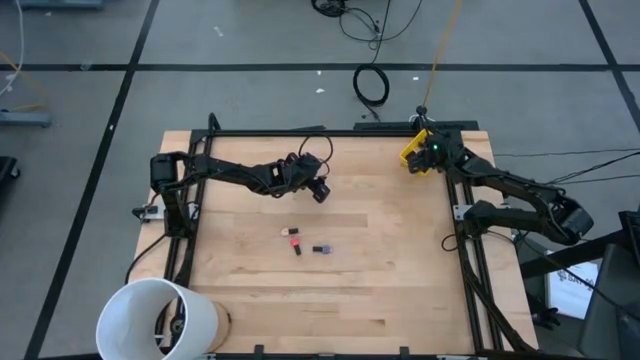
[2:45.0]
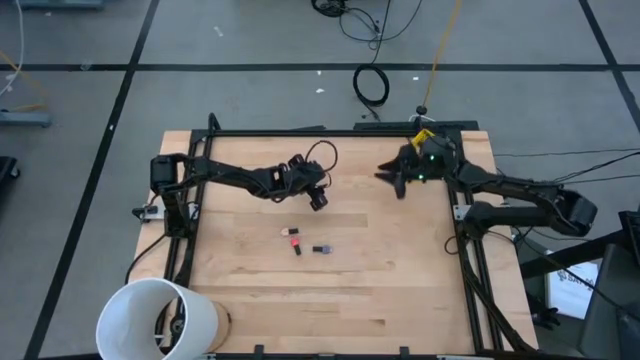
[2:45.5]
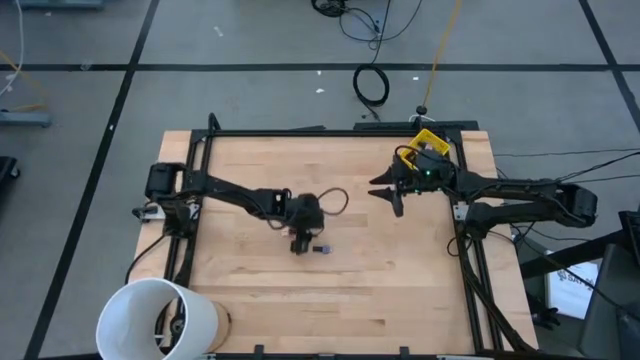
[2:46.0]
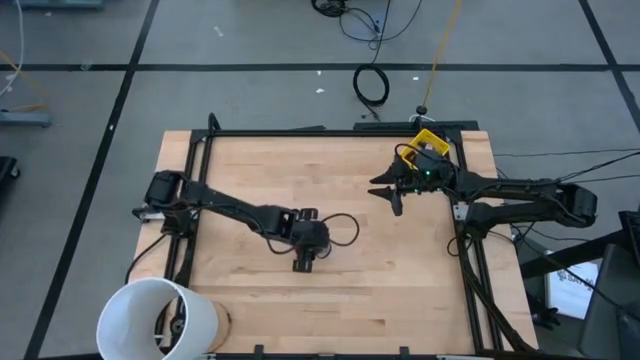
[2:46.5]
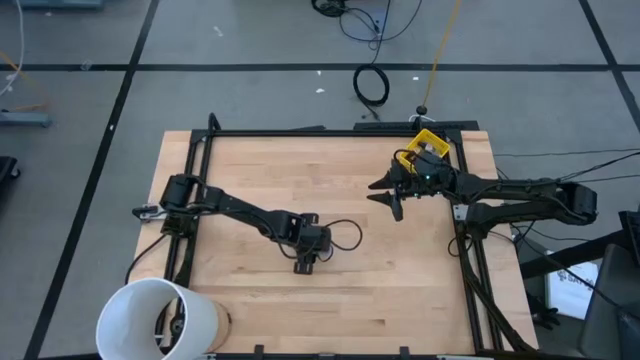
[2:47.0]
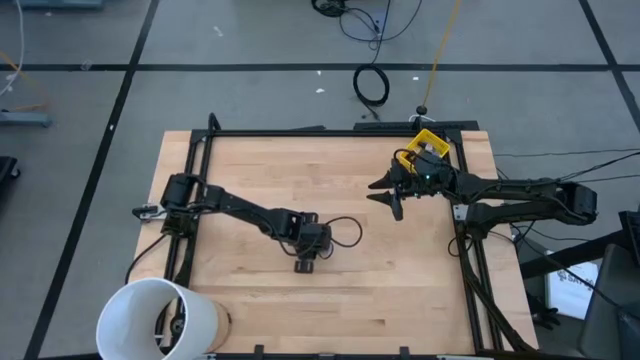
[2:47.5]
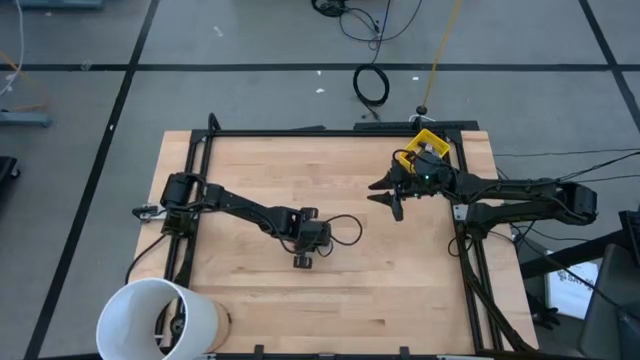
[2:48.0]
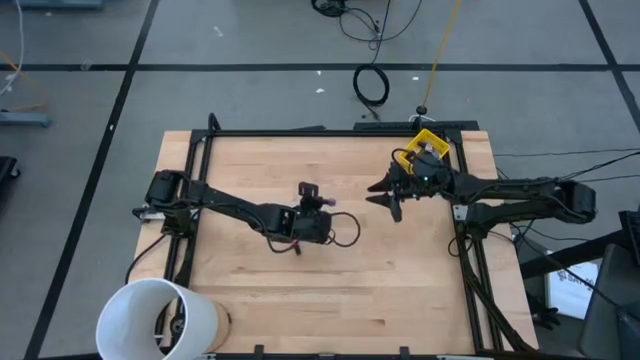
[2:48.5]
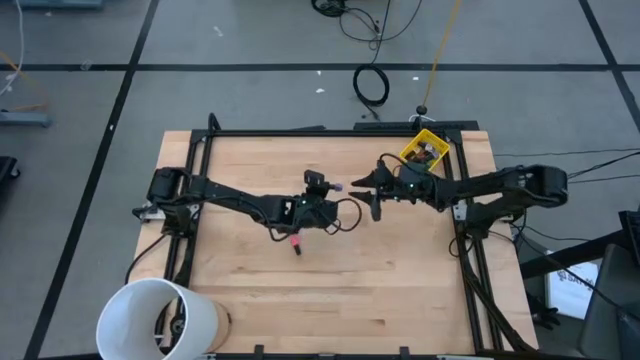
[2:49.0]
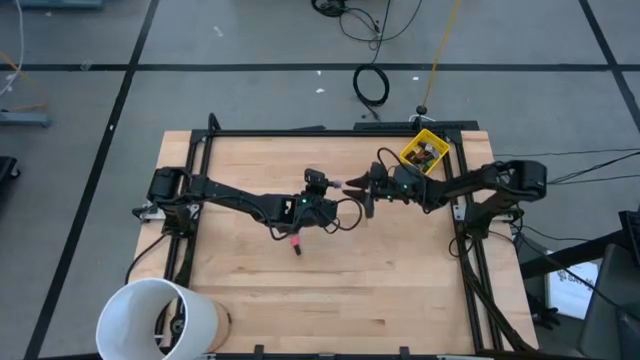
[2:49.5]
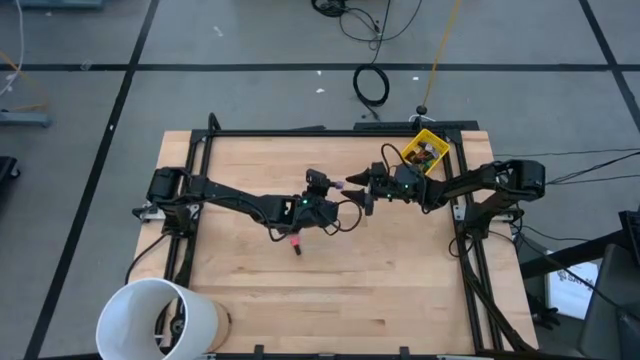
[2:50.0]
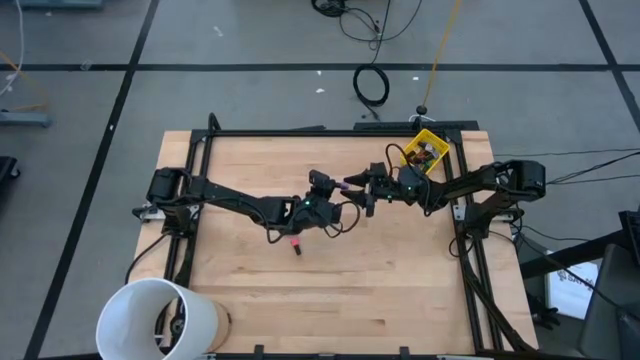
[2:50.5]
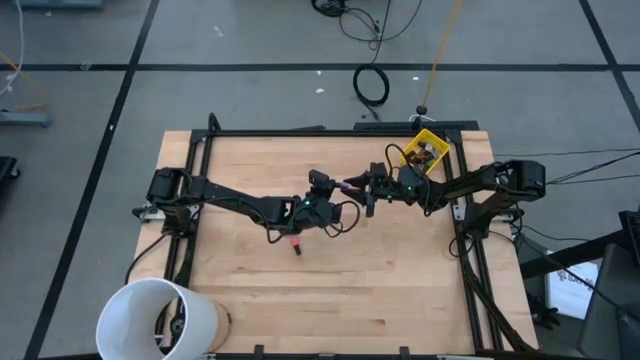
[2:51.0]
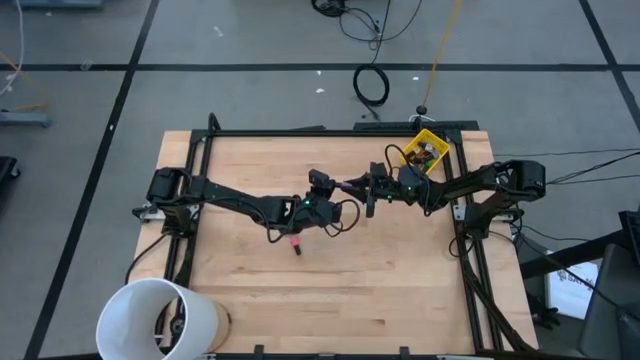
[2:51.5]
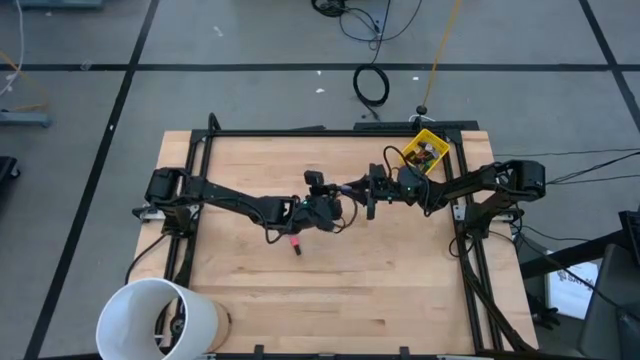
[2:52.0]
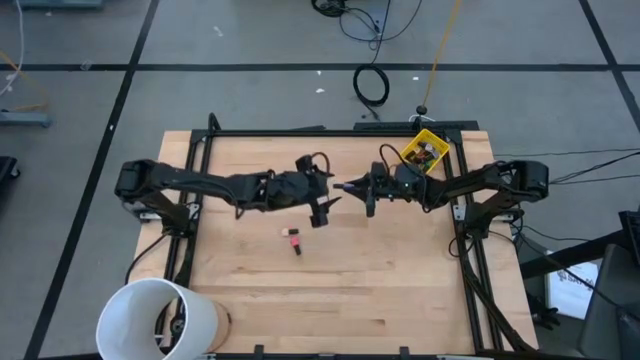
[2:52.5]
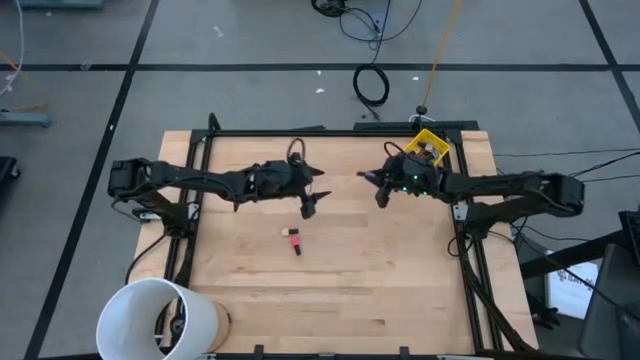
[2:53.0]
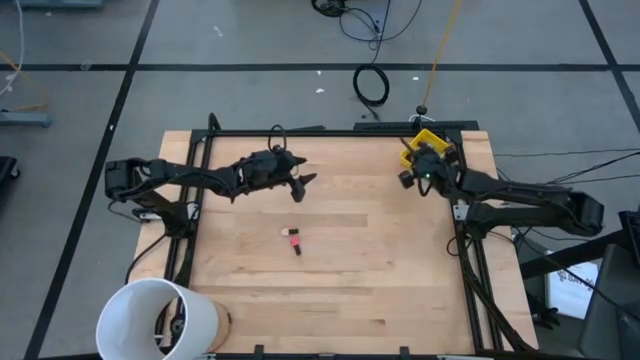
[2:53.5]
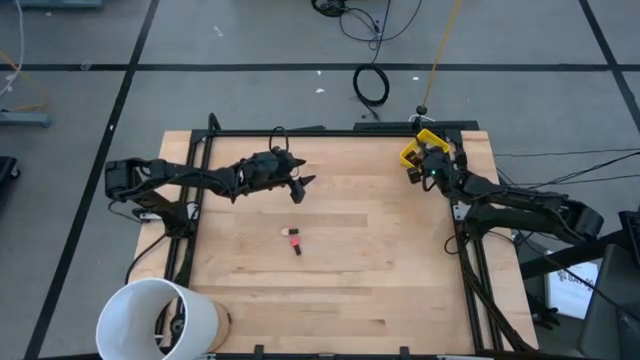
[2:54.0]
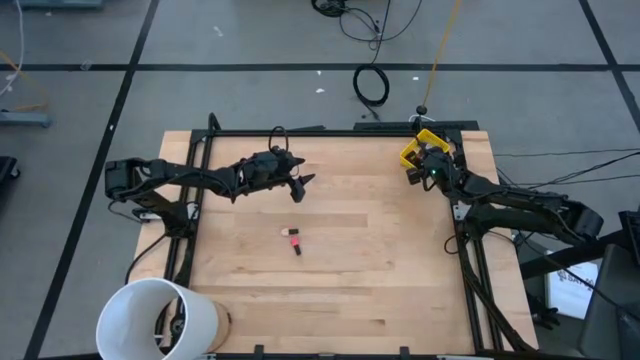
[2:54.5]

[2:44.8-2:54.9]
Task: Pick & Place Nail Polish
Put the light blue nail polish bottle into the yellow bin

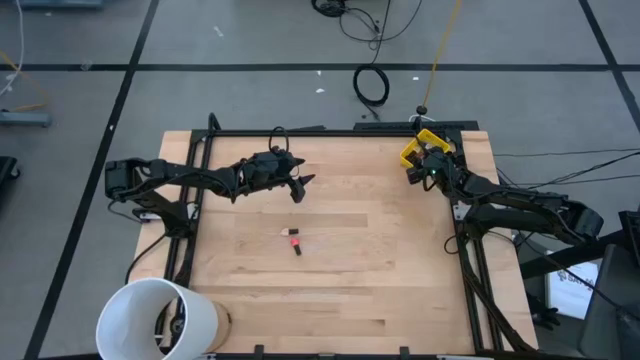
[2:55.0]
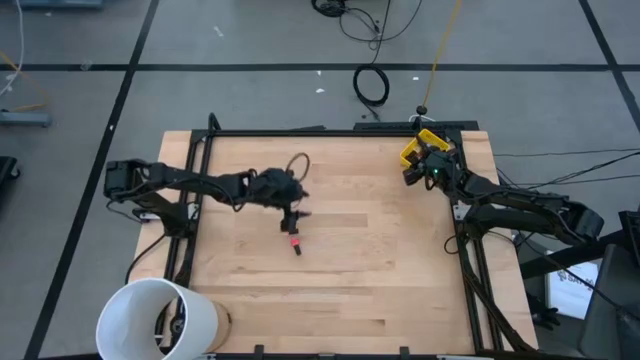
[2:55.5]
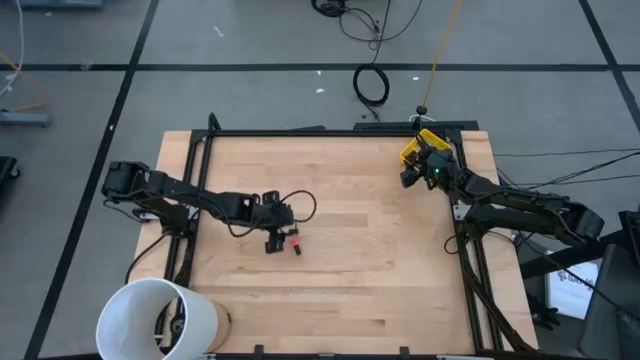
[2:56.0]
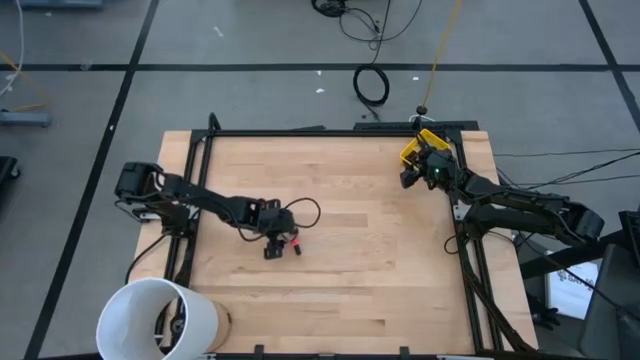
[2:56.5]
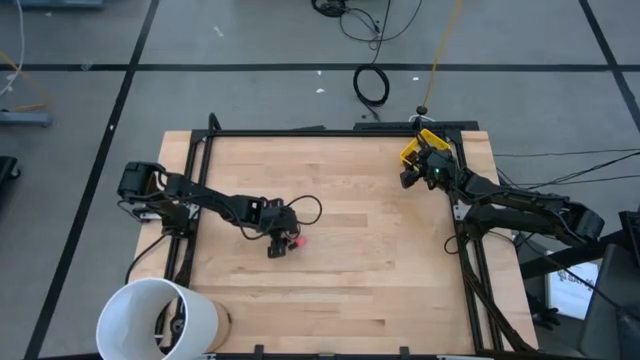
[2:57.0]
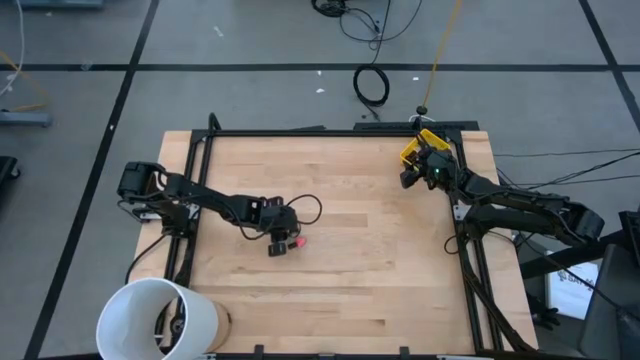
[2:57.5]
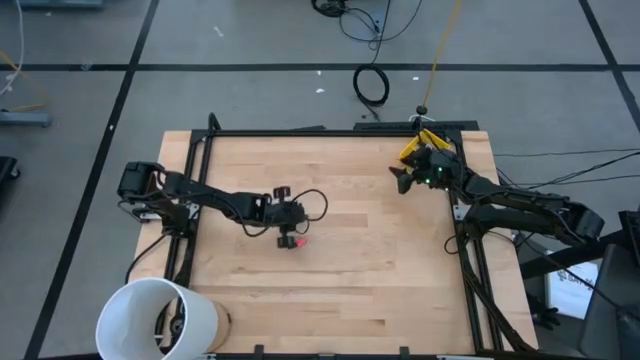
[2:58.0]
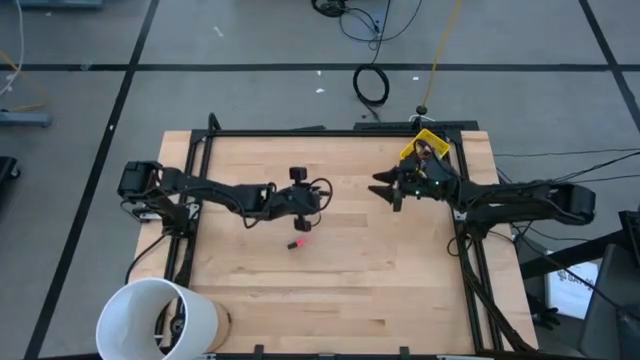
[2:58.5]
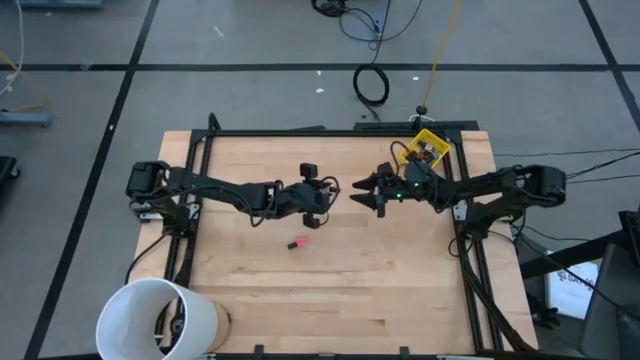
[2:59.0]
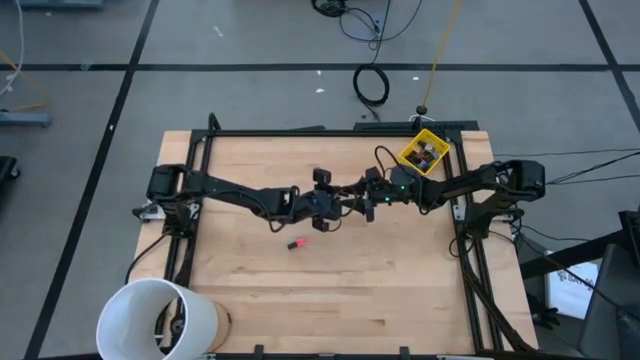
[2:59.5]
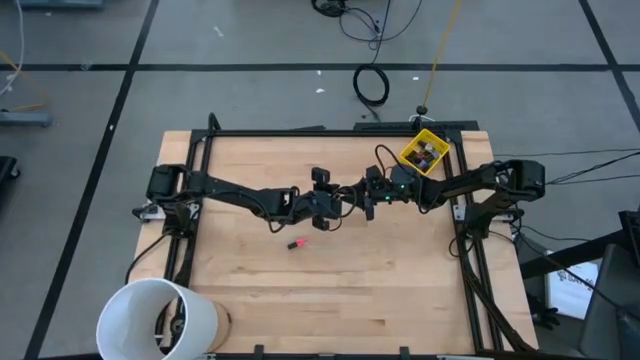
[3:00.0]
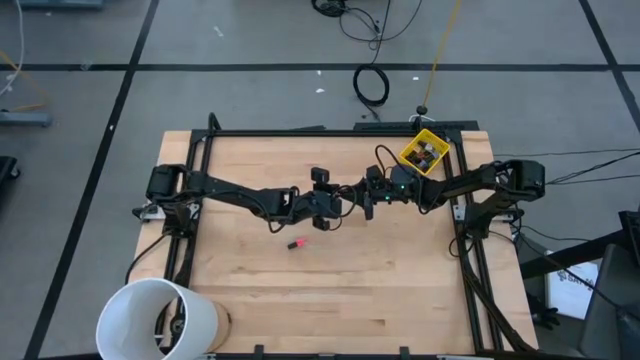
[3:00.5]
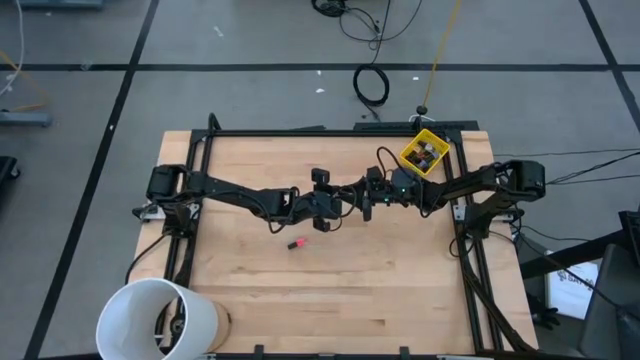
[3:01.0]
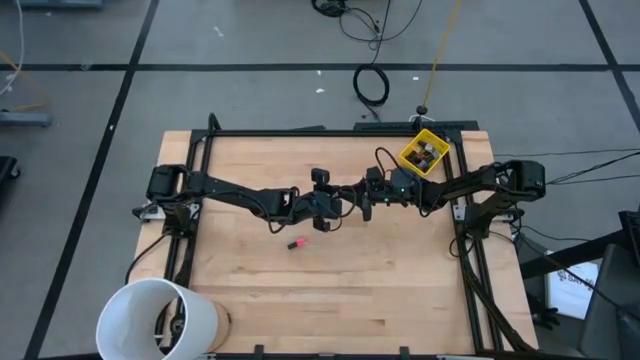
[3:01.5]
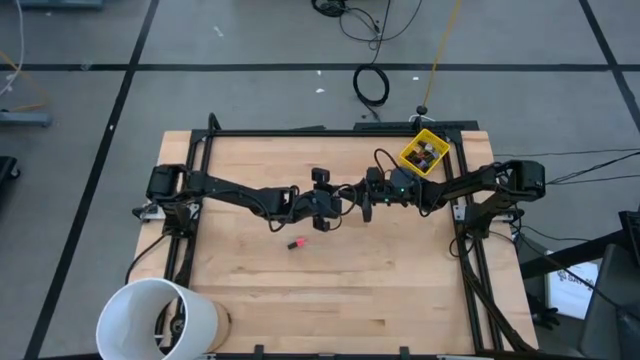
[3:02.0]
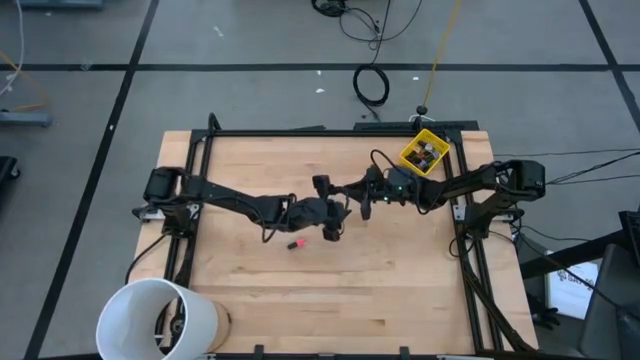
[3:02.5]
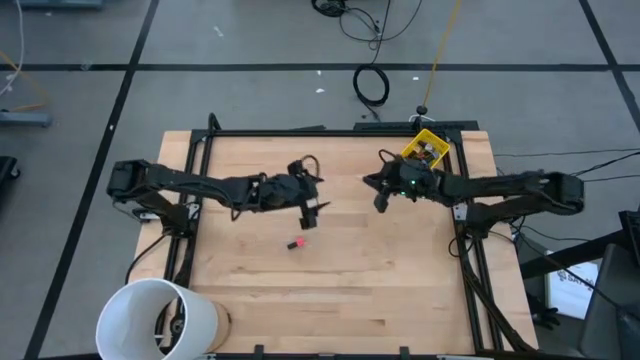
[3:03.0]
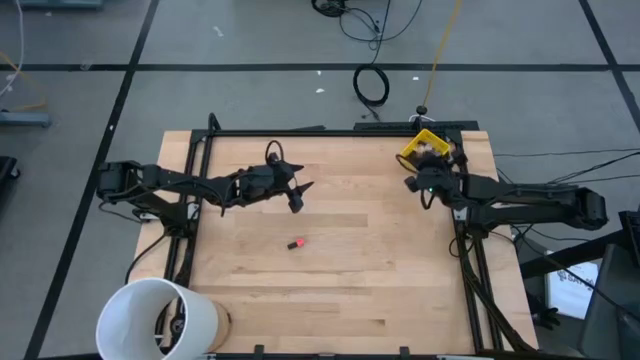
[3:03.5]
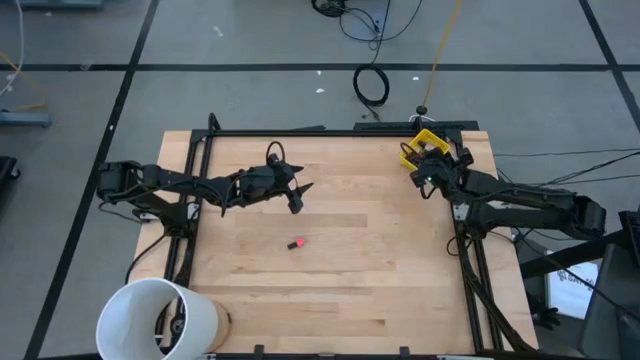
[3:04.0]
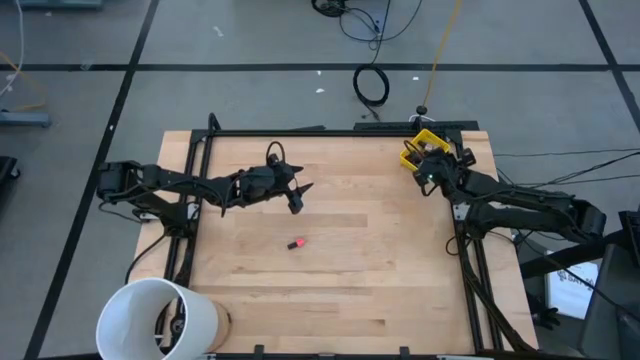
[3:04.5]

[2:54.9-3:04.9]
Put the light pink nail polish bottle into the yellow bin

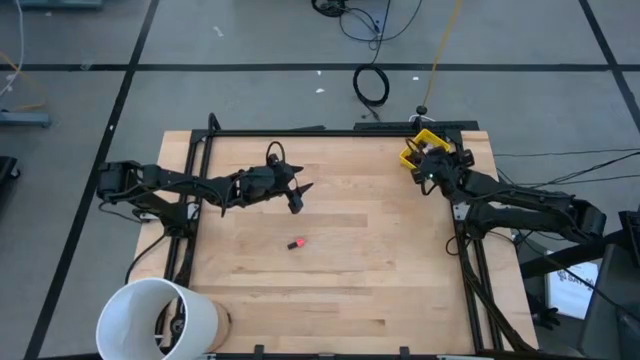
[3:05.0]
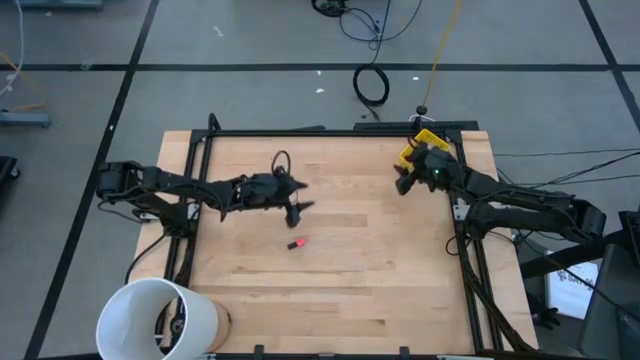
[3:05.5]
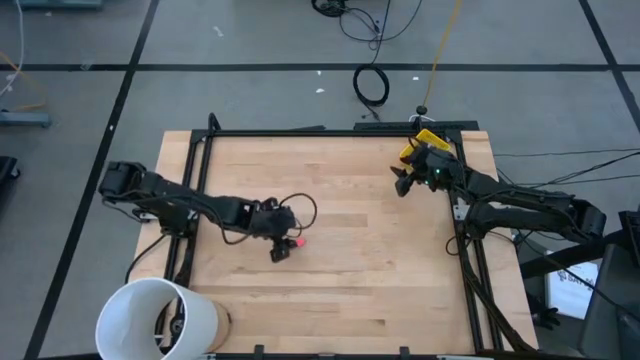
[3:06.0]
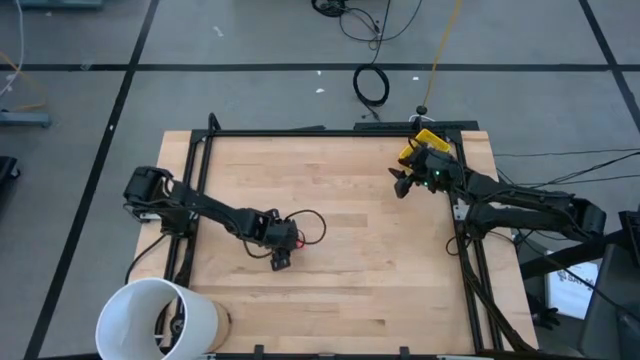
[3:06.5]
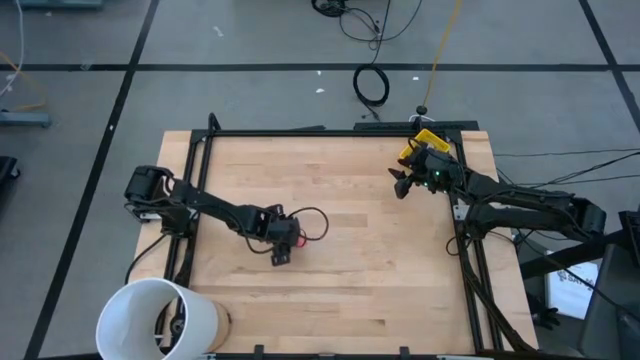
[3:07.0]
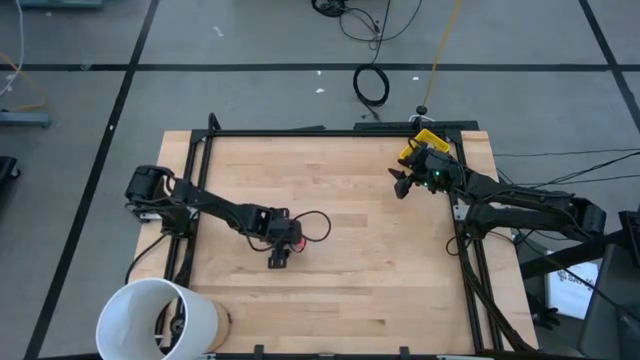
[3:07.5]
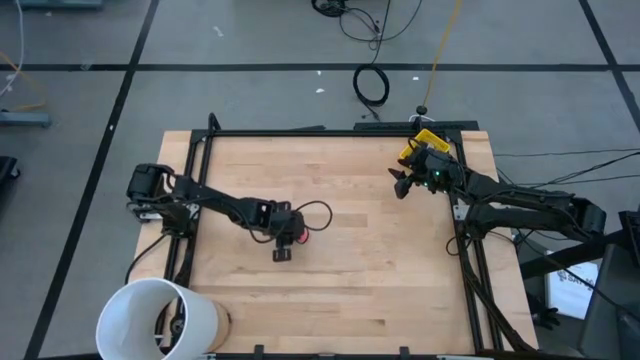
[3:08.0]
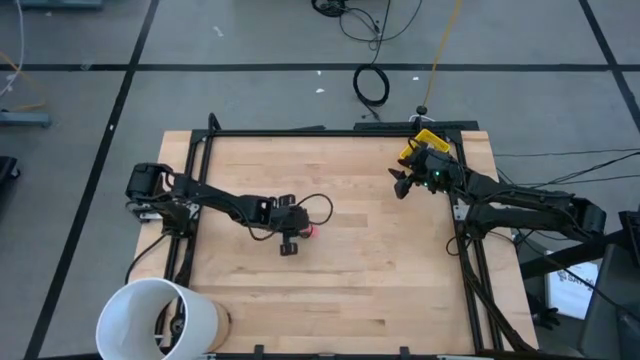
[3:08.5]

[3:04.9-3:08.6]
Put the pink nail polish bottle into the yellow bin
